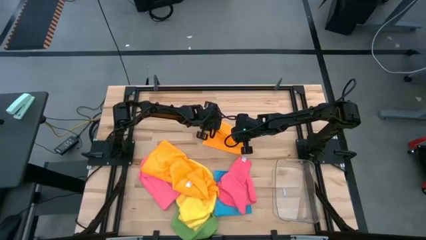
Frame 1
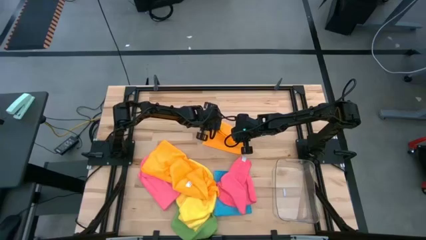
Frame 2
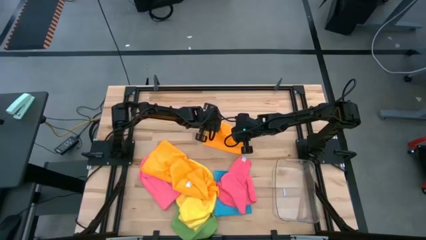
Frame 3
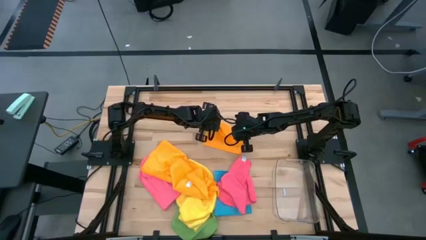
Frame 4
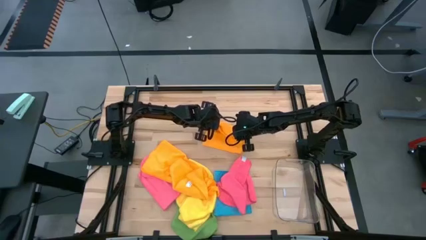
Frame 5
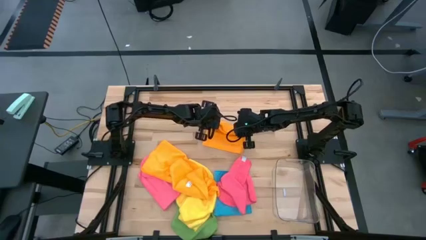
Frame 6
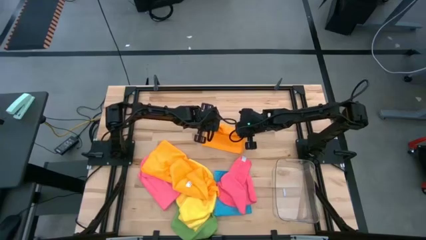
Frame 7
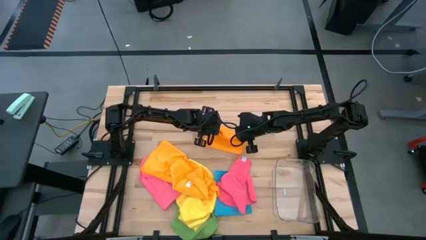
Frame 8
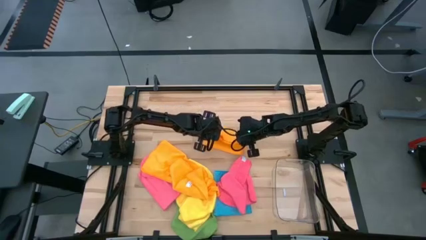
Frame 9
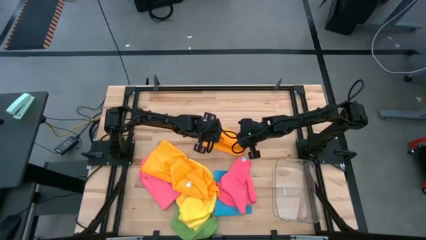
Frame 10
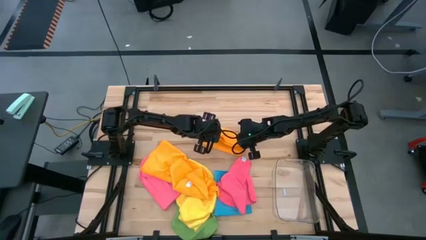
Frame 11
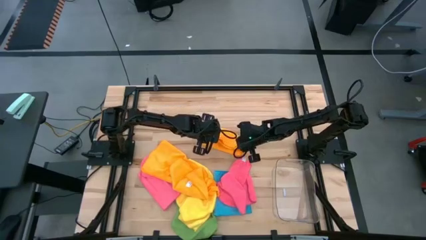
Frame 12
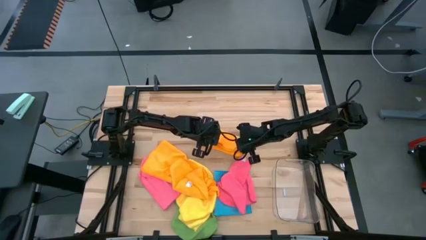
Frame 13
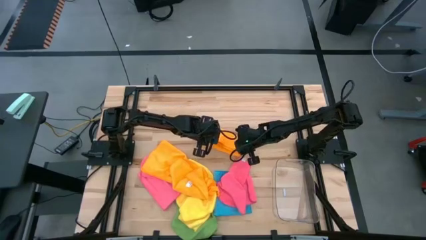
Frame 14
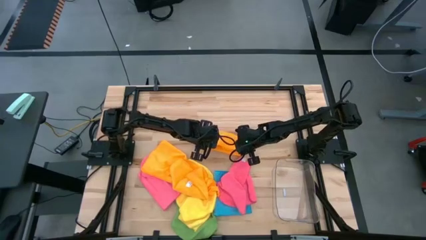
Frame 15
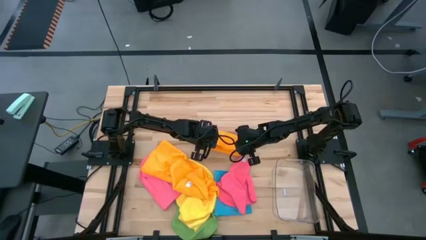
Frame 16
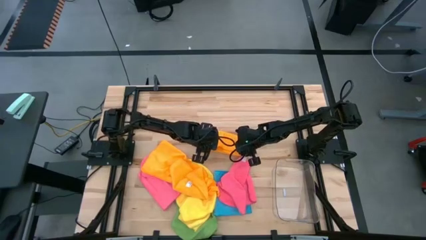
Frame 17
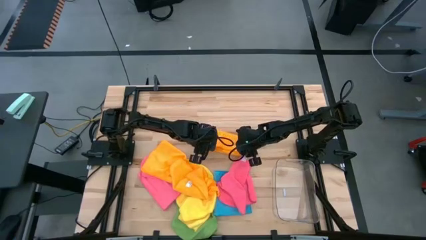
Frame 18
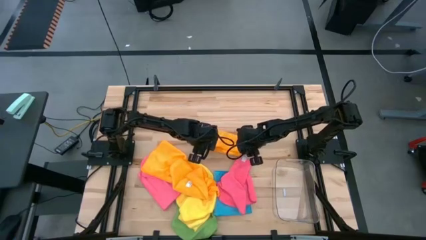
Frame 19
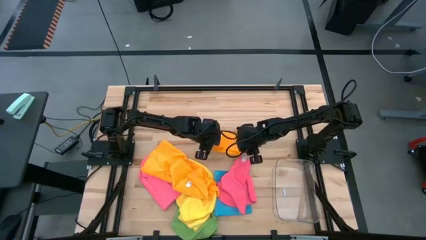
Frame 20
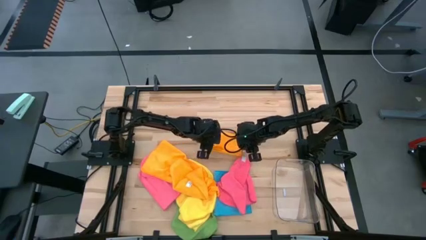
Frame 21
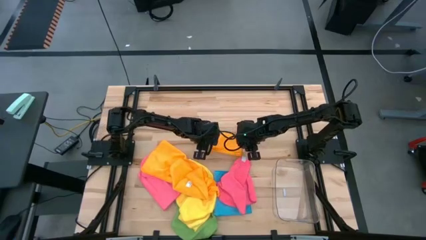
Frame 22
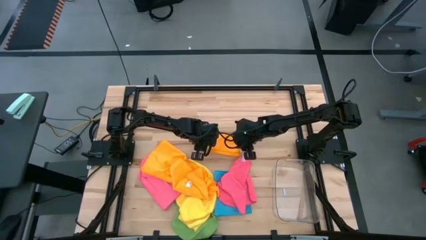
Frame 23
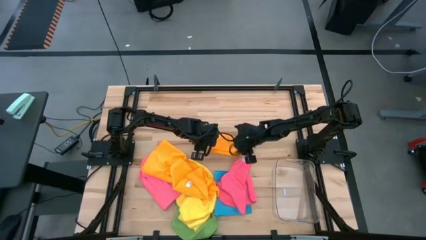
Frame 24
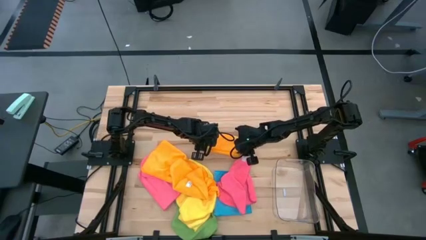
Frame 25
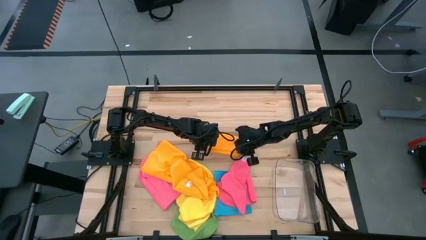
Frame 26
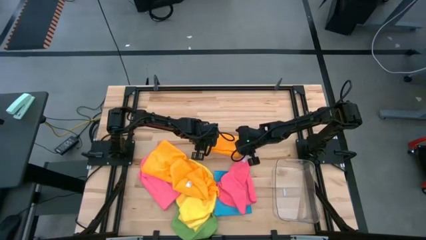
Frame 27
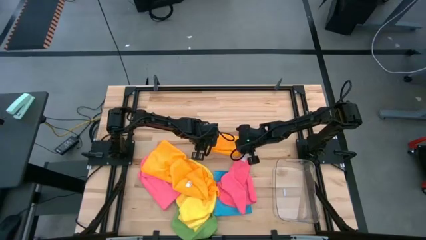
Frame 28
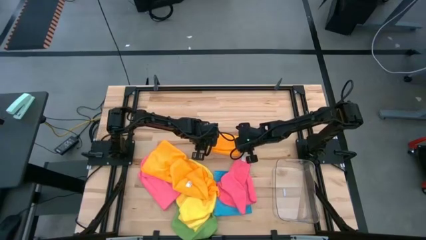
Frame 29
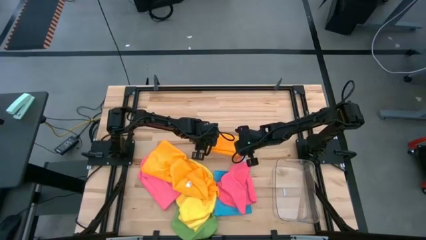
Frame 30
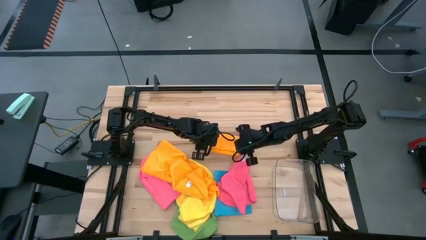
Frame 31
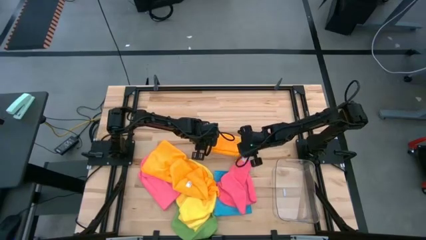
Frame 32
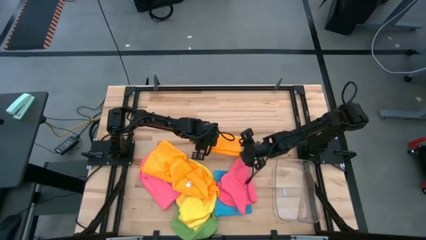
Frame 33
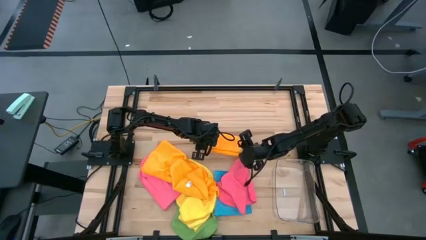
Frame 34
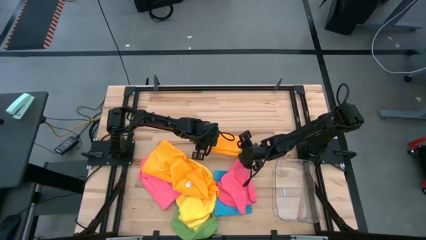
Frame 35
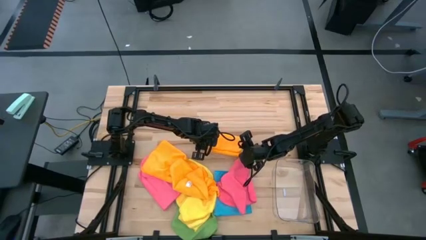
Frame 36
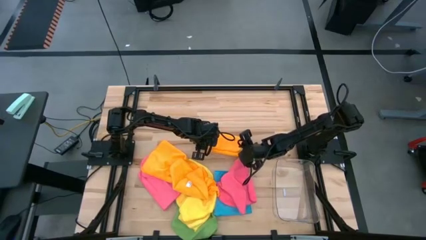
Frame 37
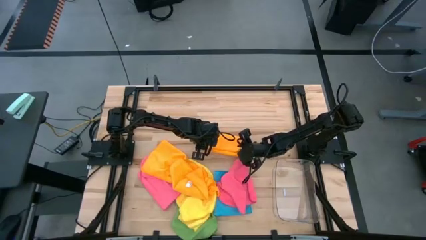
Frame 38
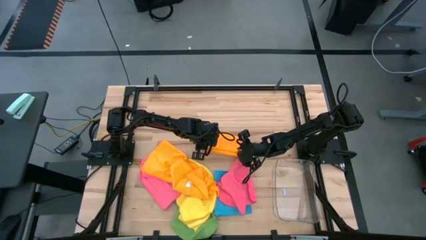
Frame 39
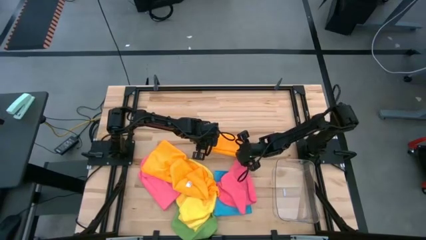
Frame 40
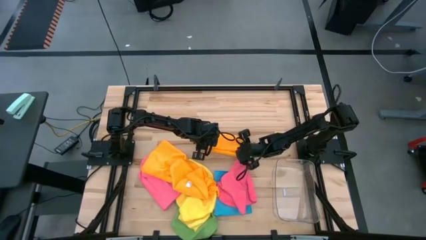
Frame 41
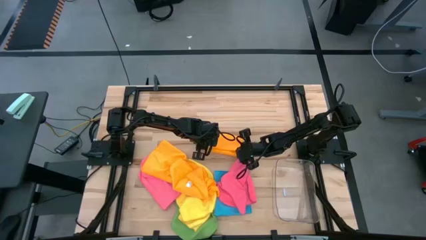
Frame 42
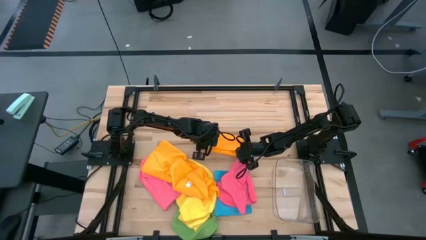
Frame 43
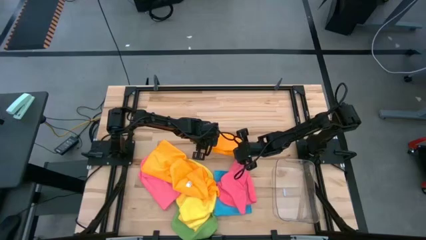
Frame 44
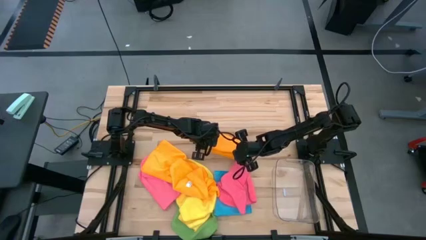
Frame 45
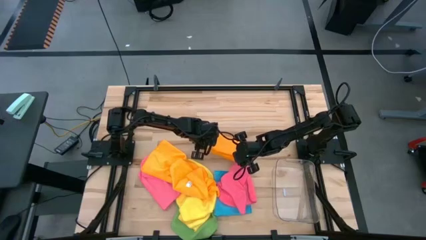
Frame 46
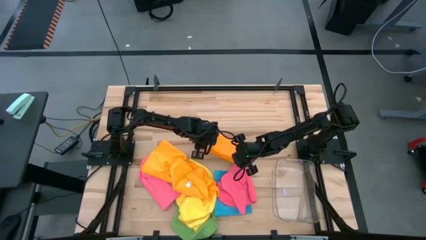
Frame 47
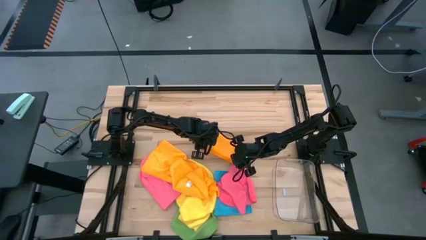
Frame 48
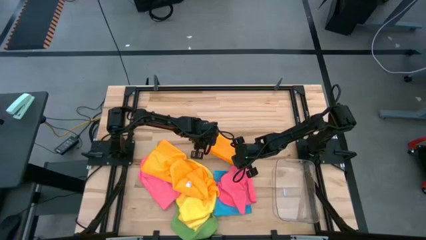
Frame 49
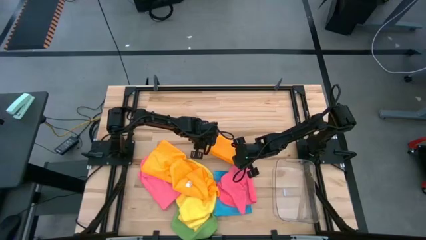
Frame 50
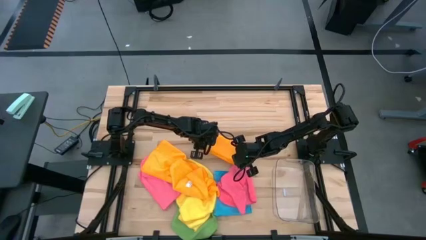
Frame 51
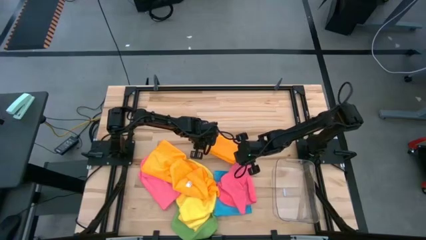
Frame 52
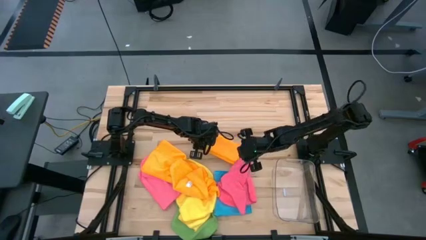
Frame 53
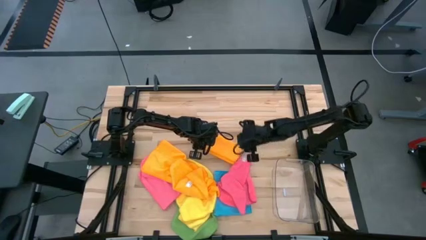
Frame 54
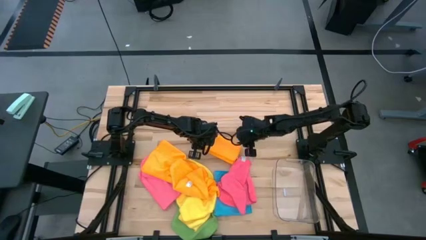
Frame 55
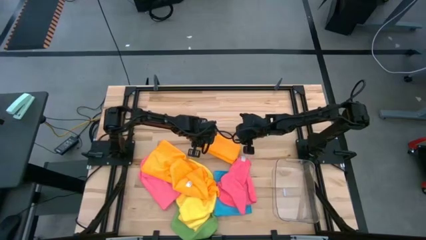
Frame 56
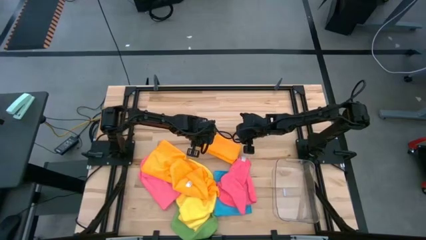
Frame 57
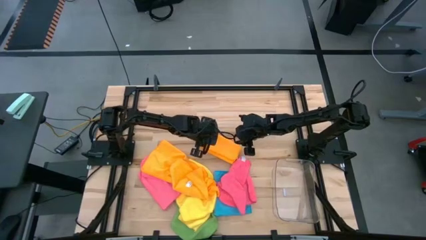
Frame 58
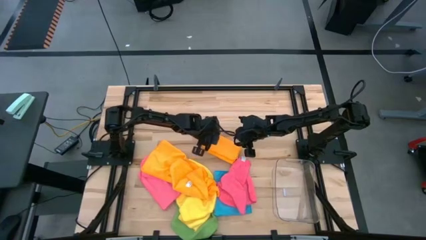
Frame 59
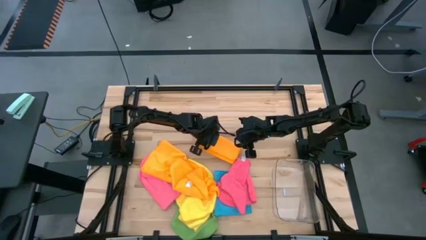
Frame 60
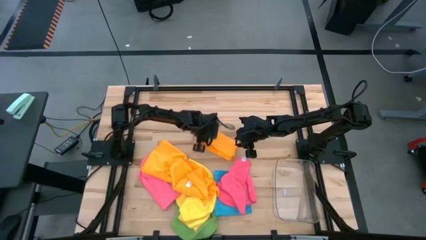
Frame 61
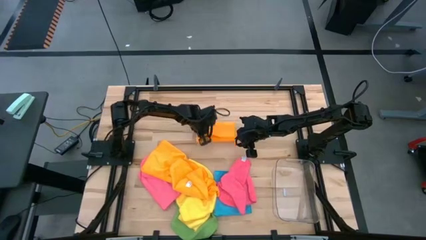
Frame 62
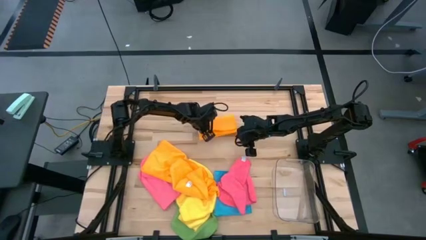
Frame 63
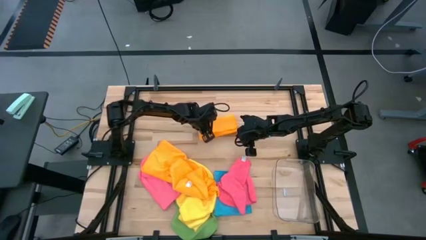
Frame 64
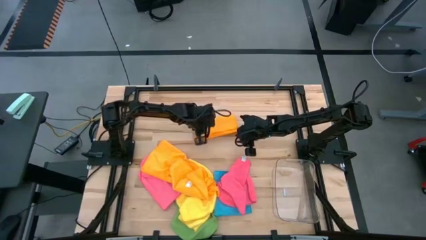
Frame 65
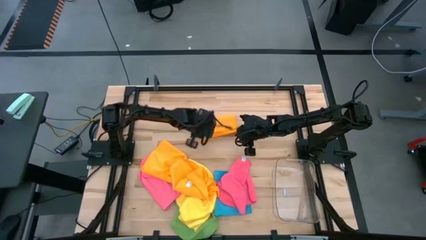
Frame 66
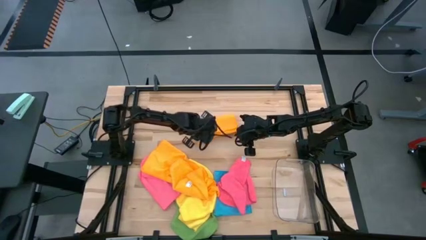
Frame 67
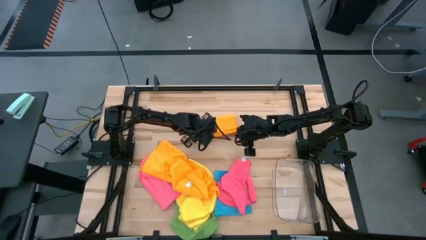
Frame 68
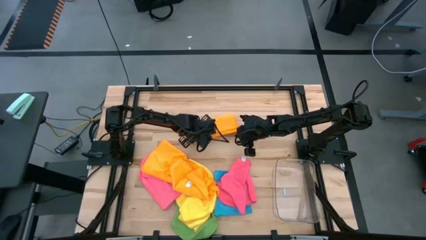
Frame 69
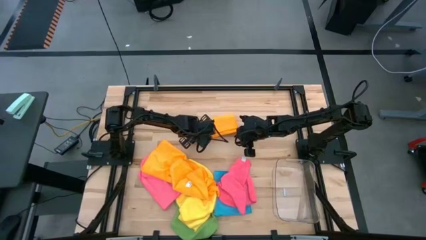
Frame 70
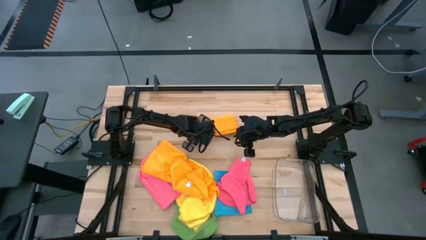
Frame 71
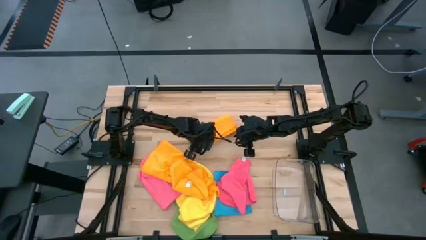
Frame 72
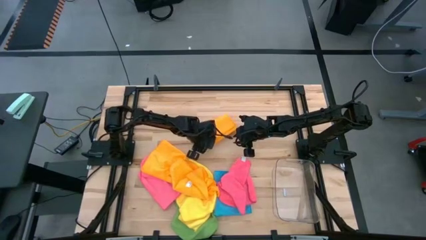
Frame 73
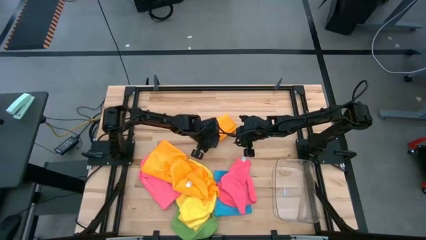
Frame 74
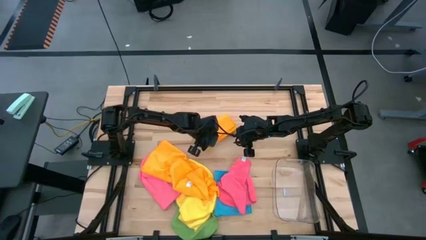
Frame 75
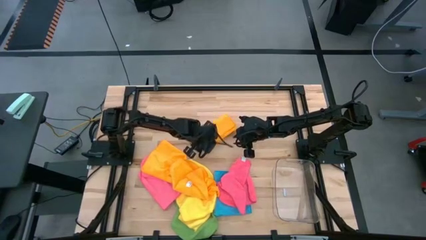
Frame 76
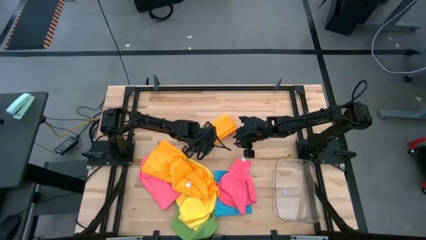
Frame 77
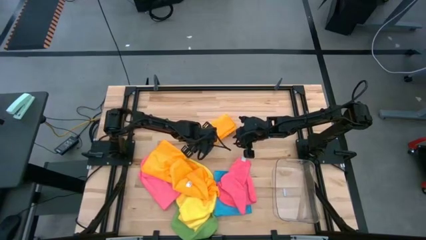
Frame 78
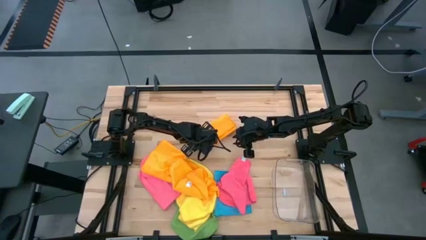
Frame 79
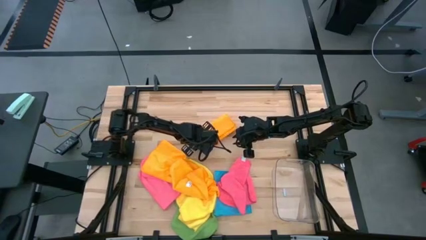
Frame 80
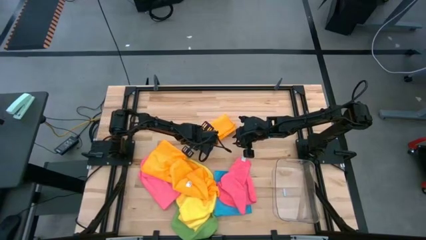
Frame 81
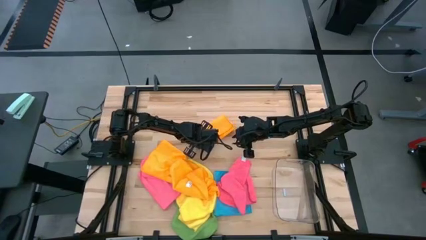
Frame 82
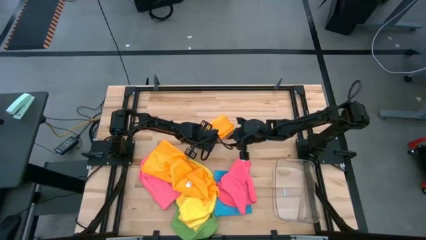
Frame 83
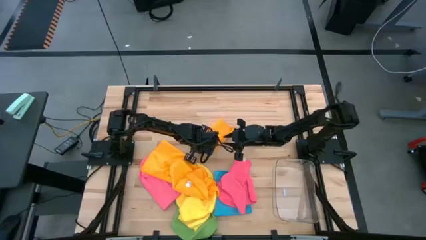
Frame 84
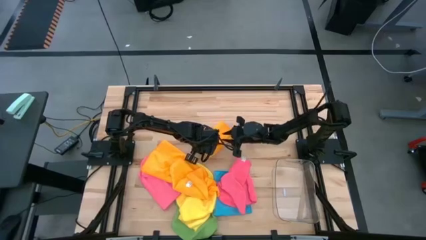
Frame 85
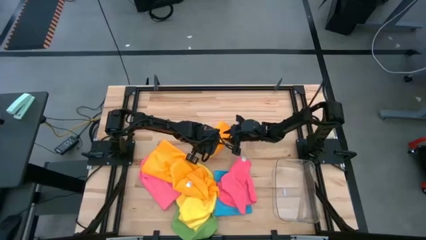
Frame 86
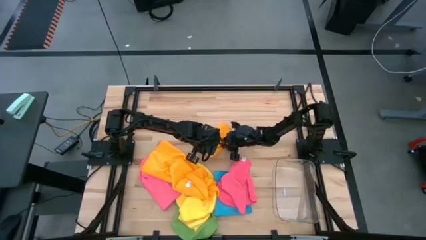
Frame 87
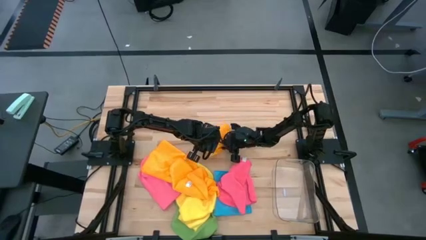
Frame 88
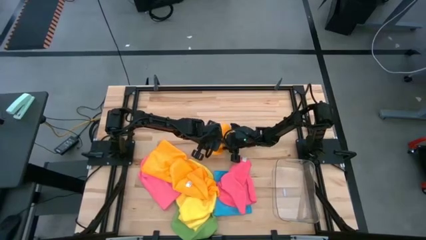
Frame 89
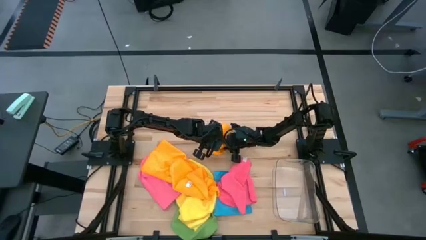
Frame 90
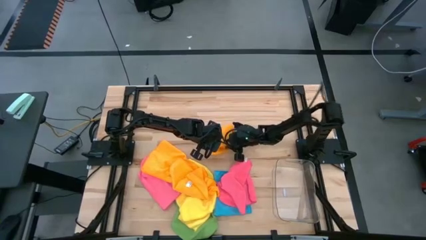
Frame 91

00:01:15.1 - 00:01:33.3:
Task: Fold microfiber towels
Fold the orange towel
